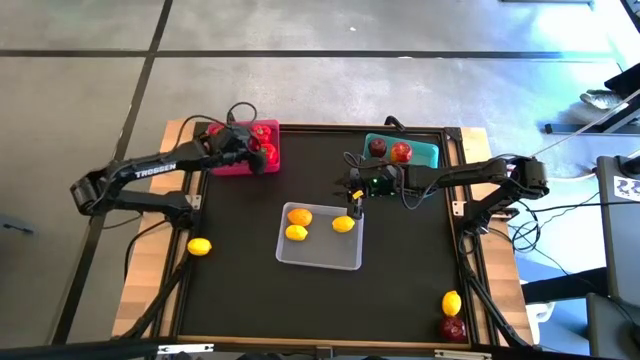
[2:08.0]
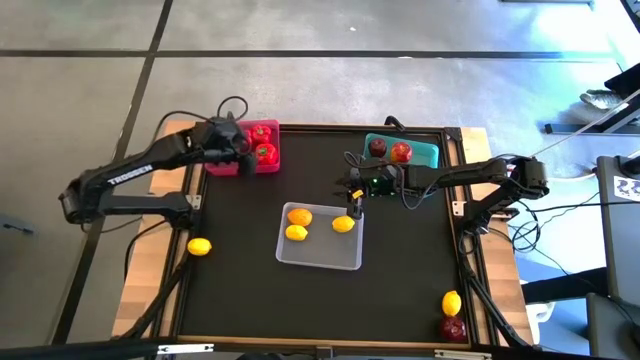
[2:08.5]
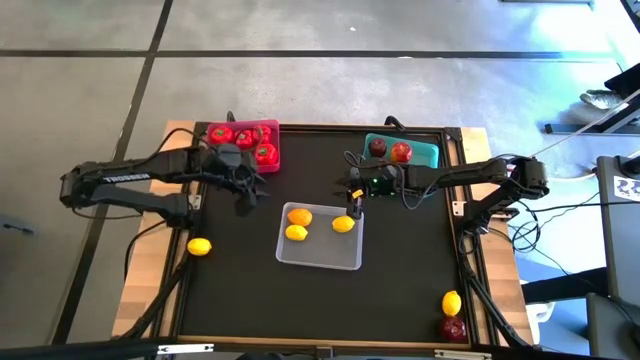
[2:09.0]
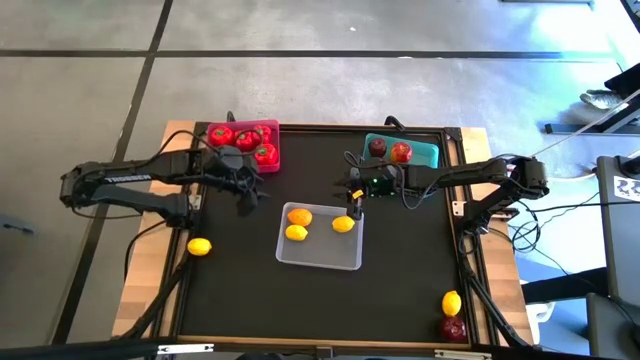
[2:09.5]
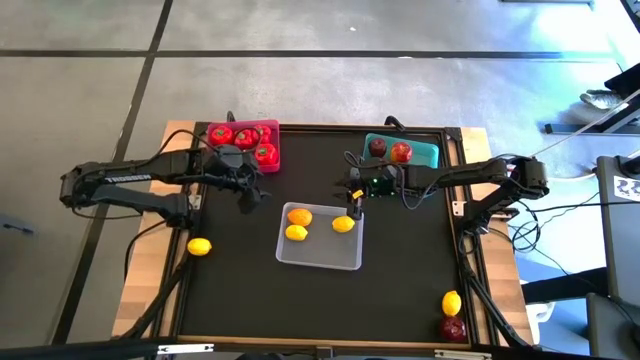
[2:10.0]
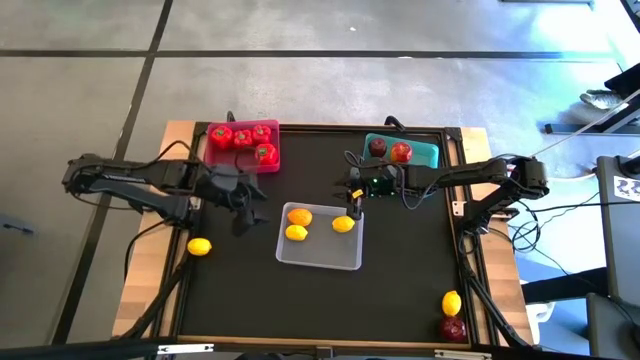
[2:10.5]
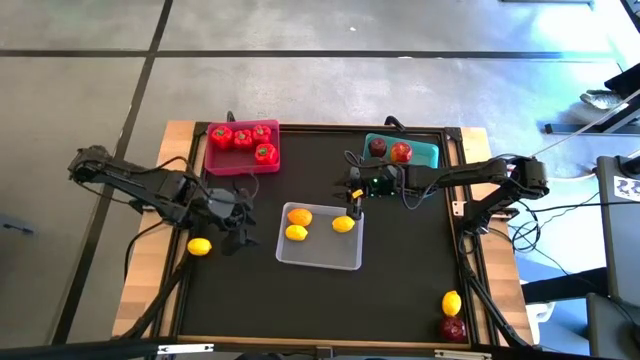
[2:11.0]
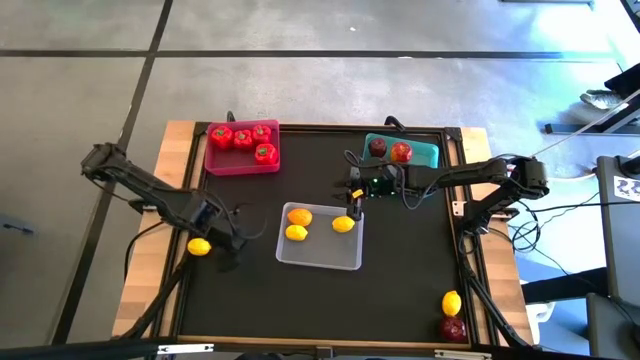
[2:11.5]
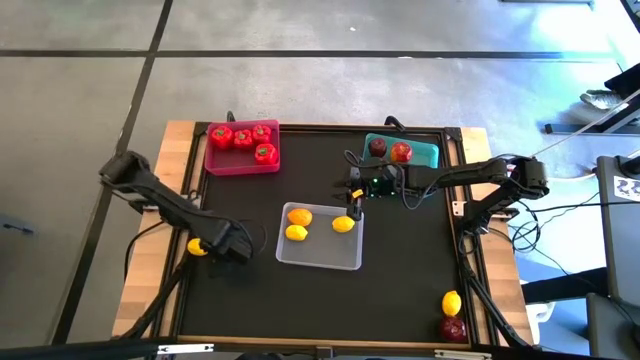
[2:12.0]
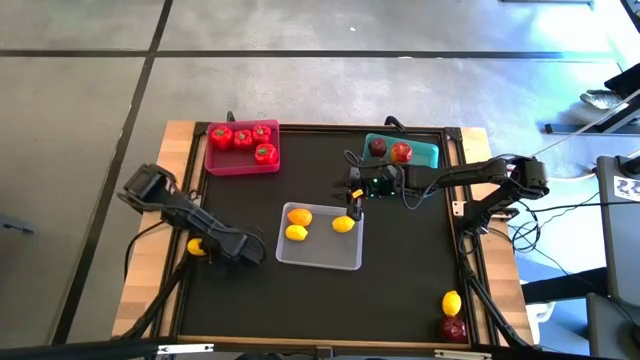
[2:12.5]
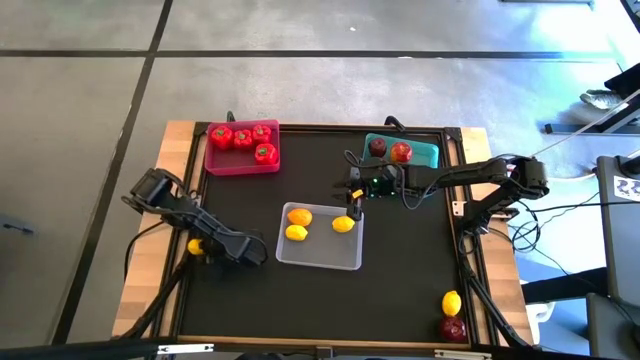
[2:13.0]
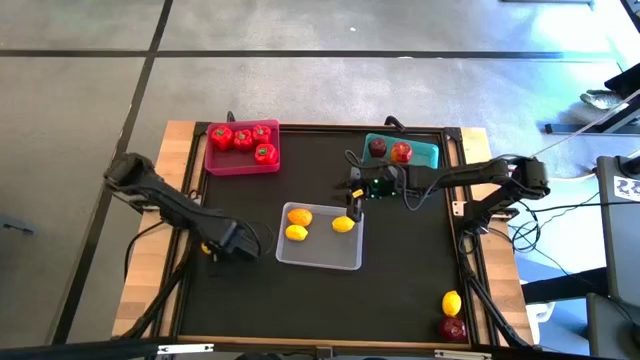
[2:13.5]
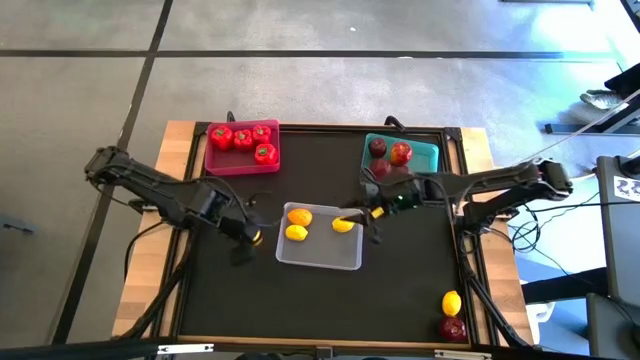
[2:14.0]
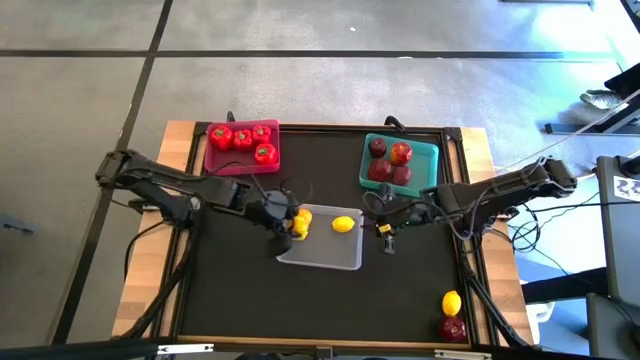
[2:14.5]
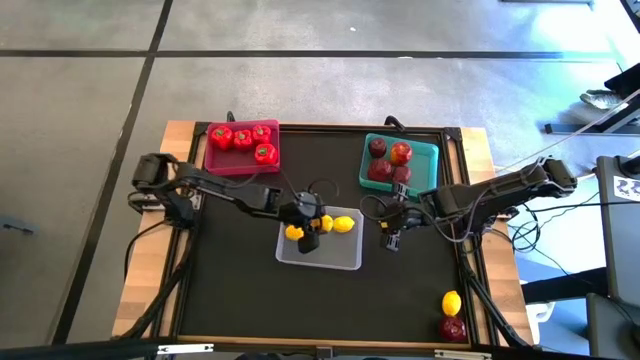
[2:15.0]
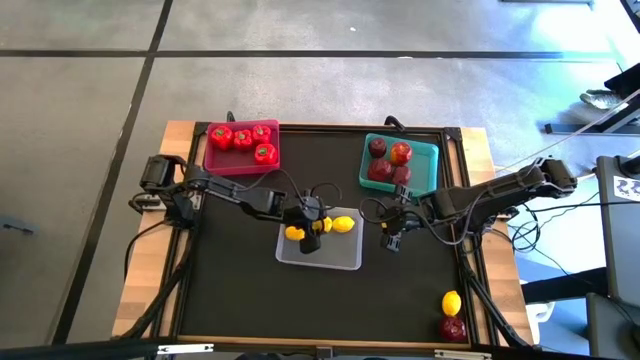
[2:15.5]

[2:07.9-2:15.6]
Task: Sort produce into baskets
Put the lemon into the white bin

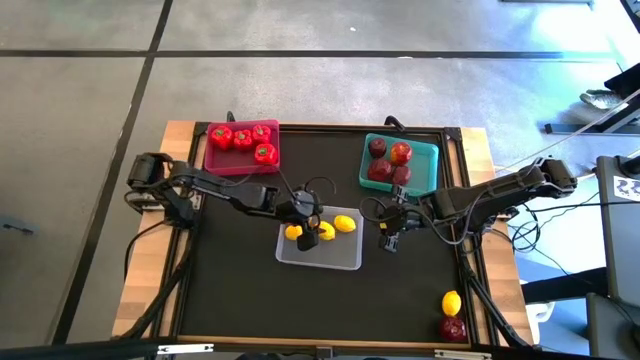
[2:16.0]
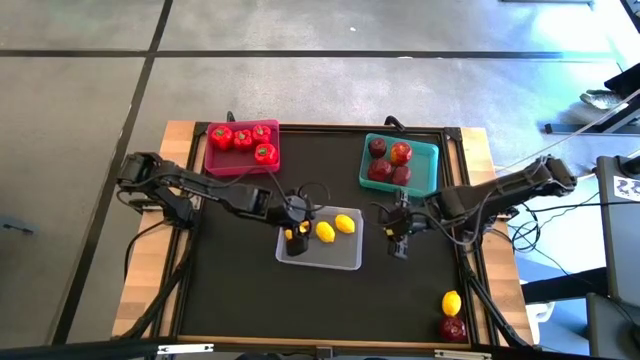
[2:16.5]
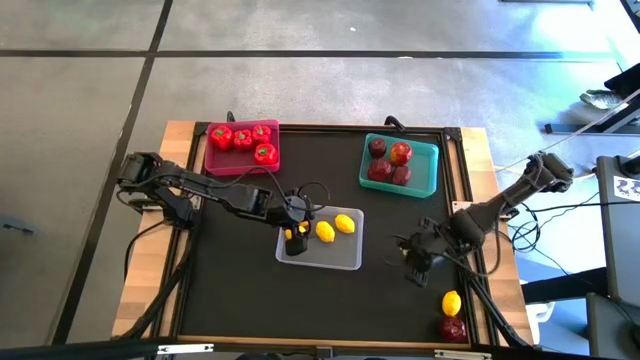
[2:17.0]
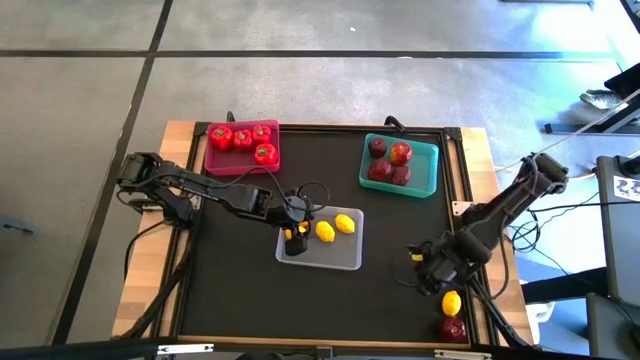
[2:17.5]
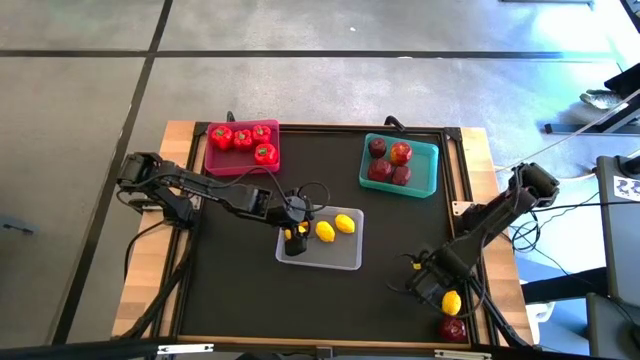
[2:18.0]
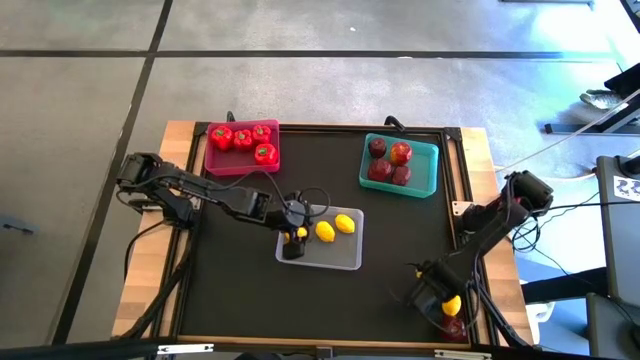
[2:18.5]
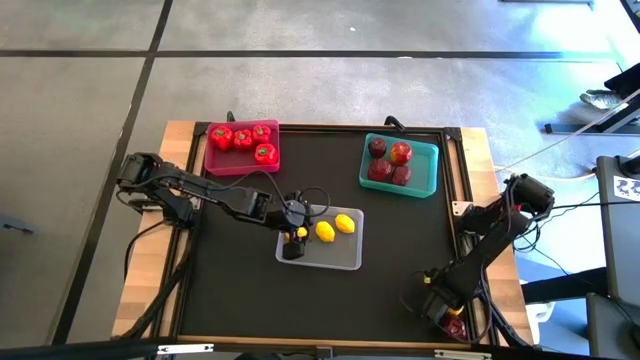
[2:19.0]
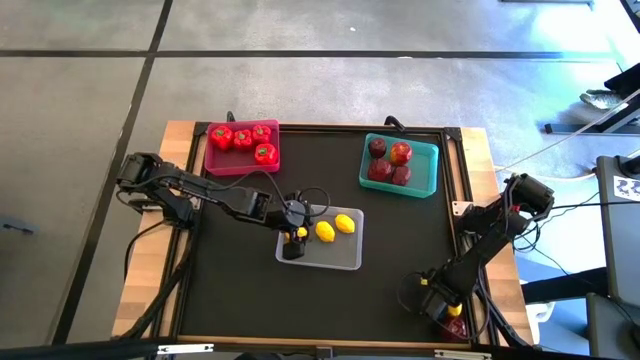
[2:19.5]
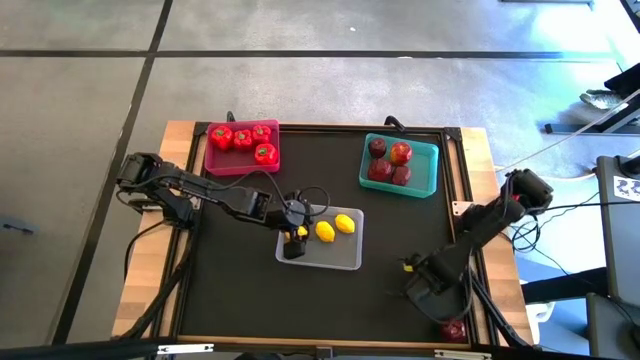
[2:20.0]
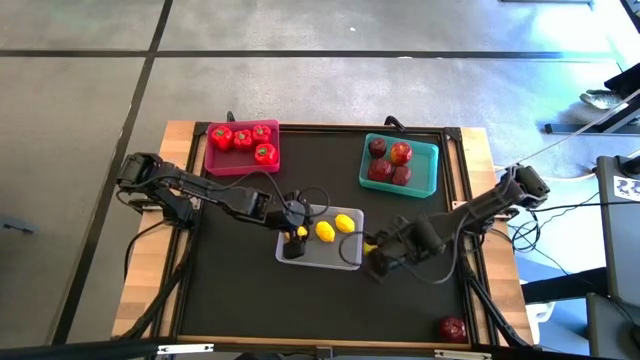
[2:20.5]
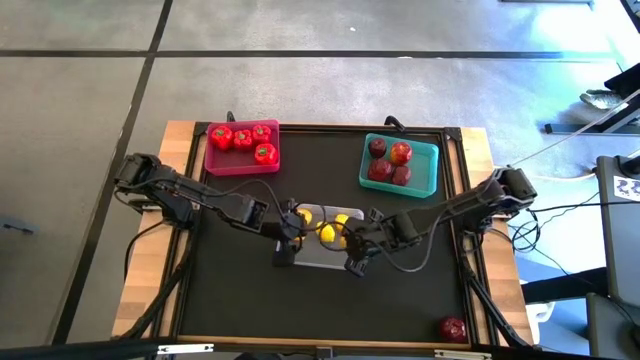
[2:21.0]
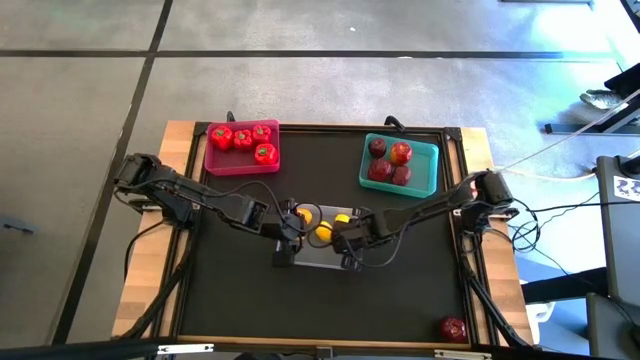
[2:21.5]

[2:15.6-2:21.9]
Put the lemon into the white bin

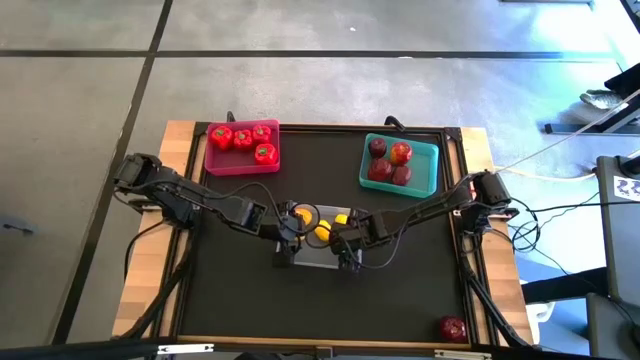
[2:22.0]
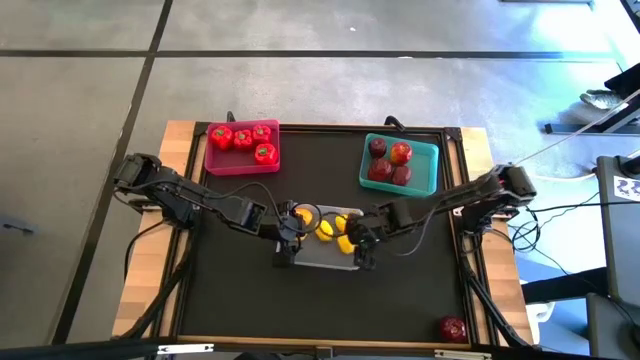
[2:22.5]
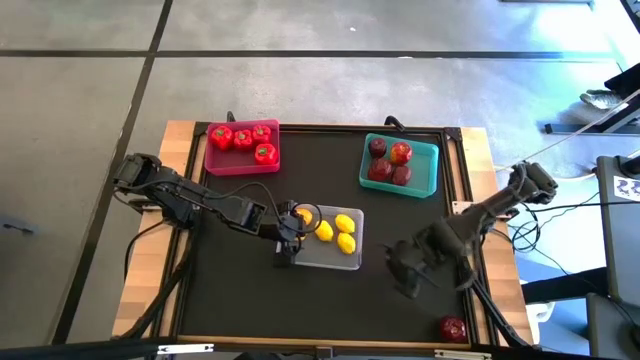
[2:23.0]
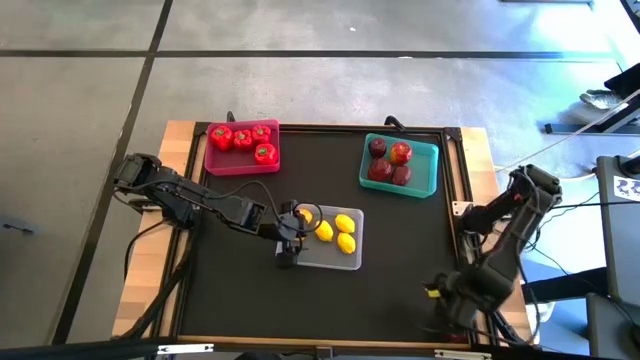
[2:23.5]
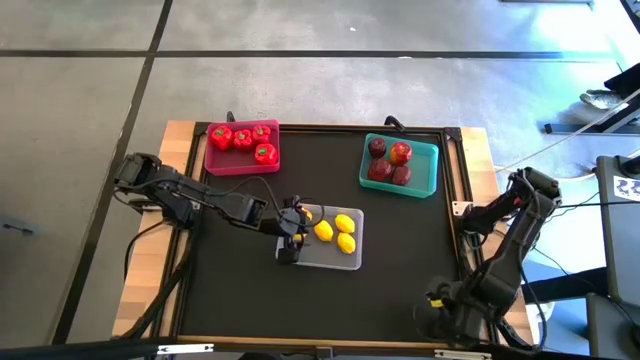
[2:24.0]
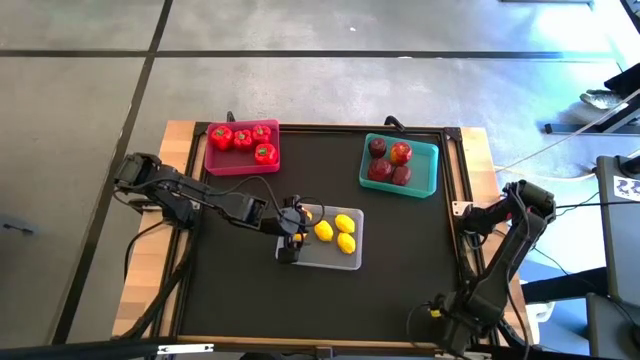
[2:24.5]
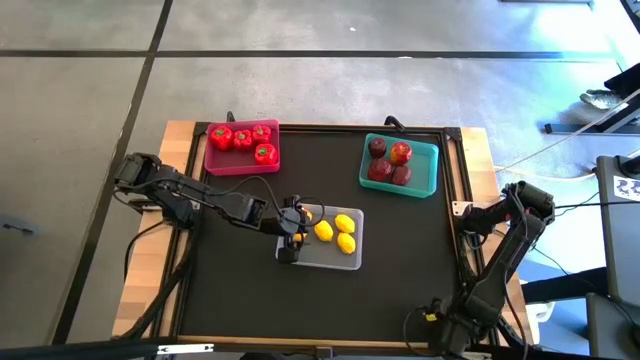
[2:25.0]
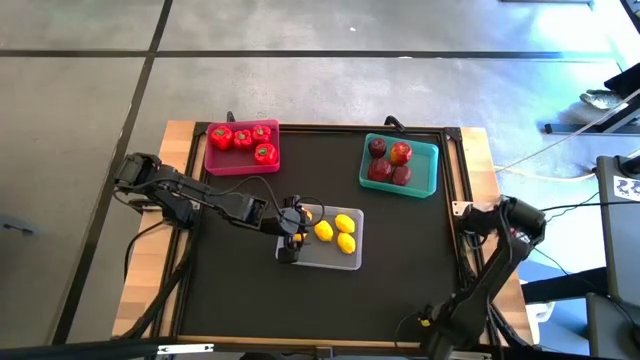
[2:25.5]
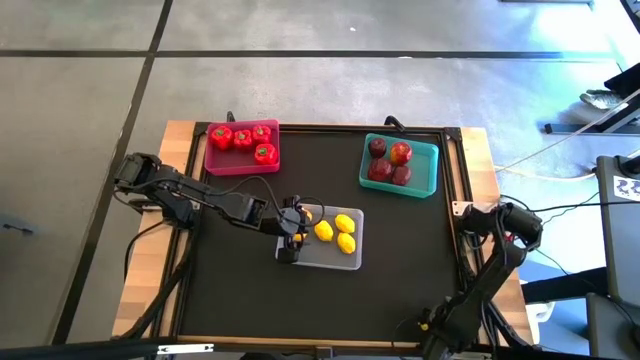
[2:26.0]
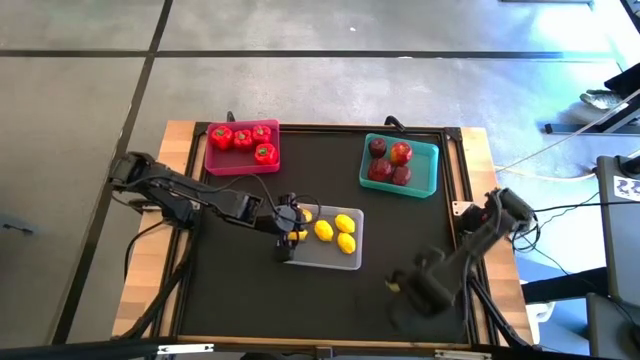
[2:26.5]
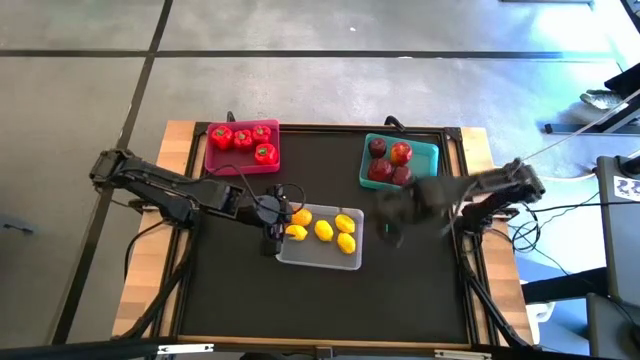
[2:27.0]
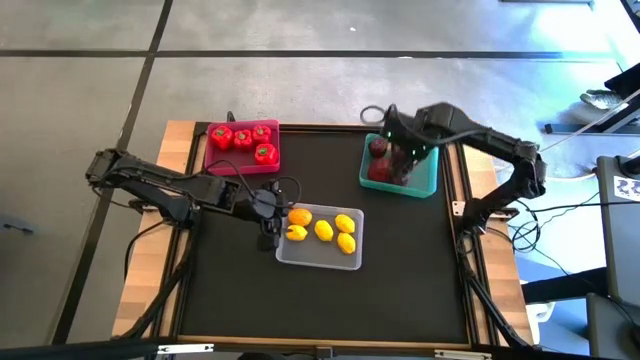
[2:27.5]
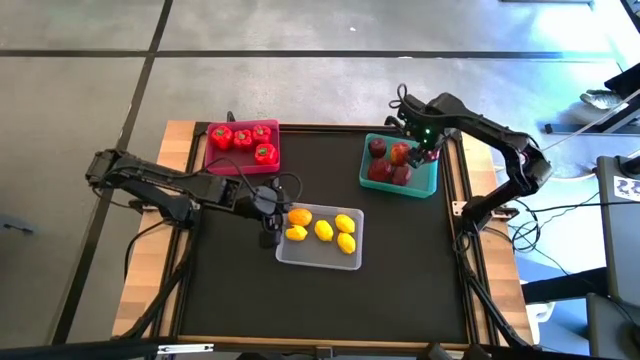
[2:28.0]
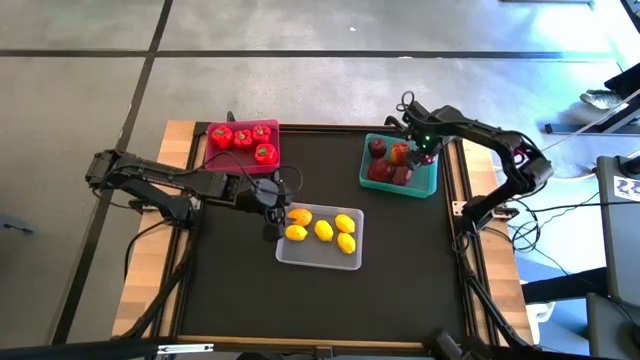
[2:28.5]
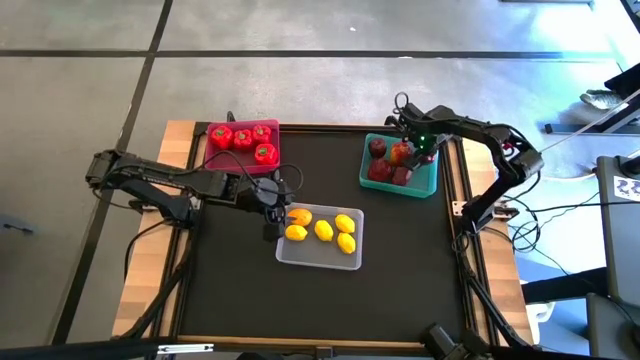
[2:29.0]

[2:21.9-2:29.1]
Put the apple into the blue bin
